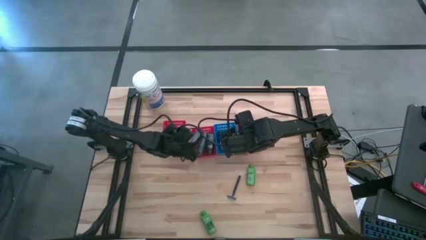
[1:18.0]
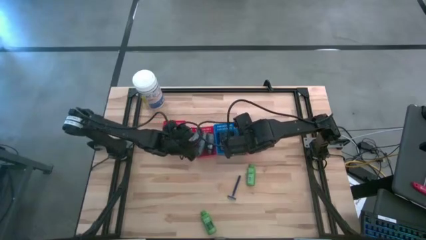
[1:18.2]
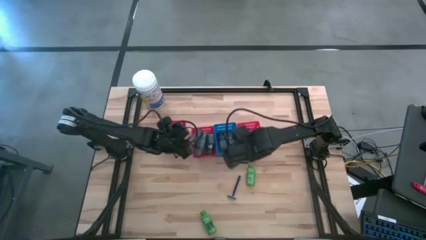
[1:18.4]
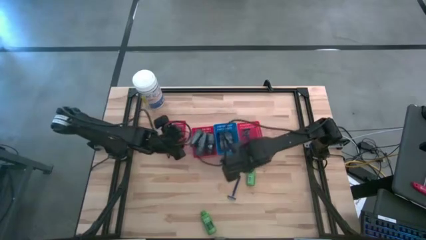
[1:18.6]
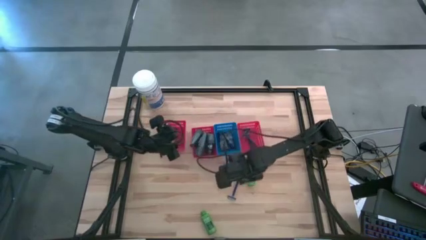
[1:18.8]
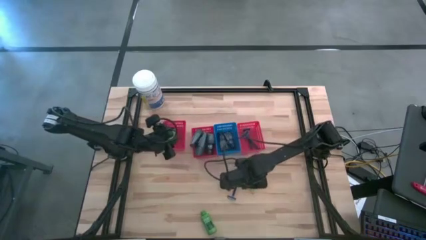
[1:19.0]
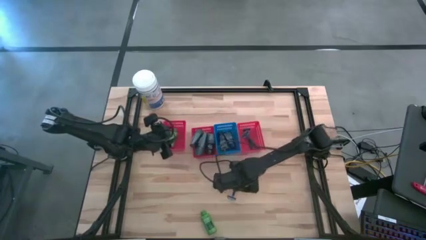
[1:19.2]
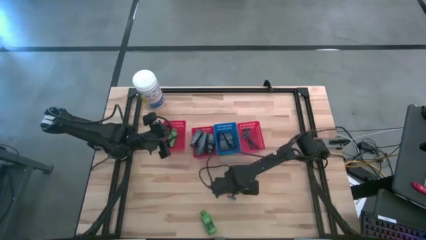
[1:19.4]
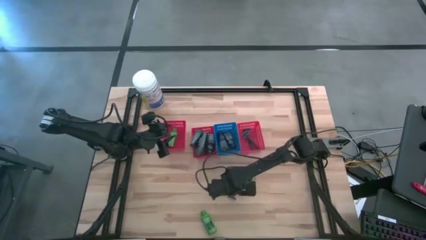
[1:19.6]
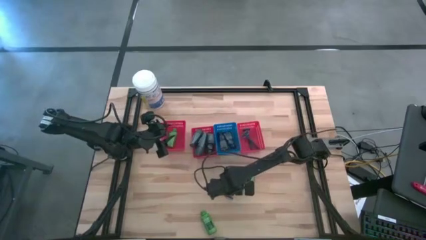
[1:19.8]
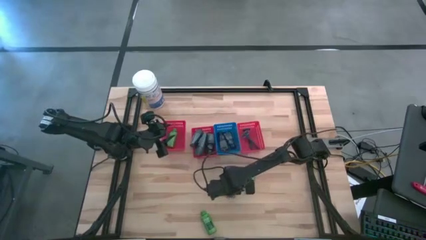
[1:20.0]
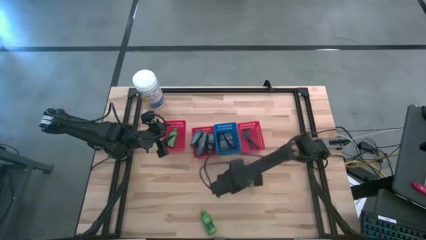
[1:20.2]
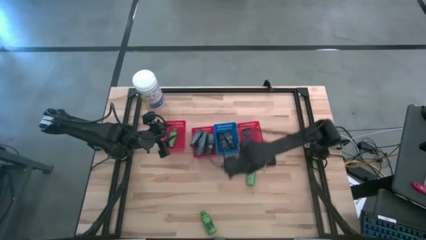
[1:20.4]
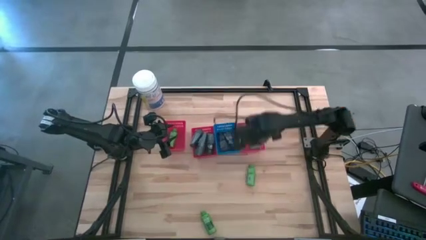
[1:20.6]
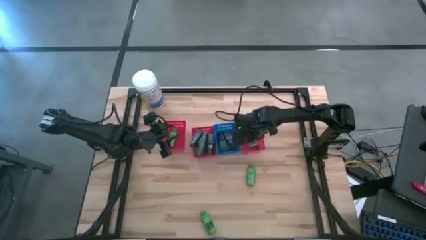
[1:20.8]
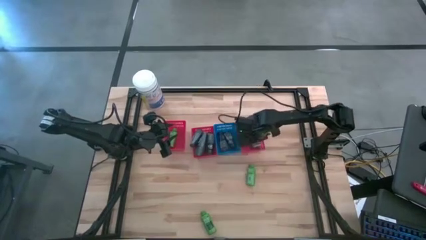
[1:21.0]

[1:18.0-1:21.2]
Task: Pick & Place Travel size toiletries
Put the blue razor into the right red bin

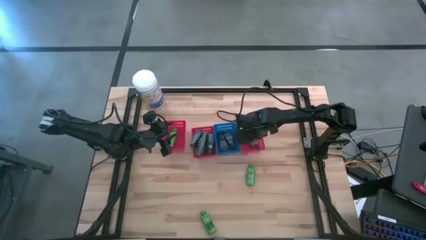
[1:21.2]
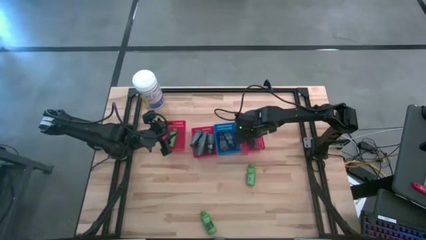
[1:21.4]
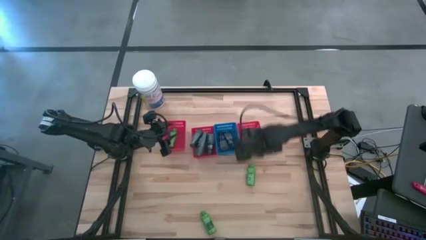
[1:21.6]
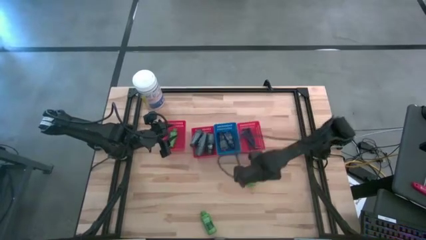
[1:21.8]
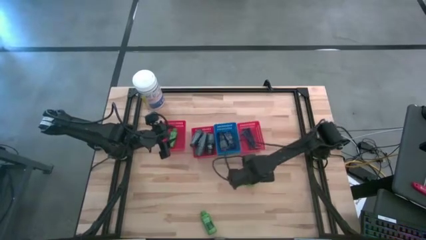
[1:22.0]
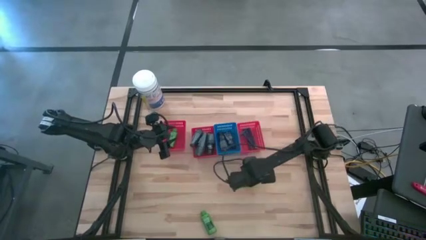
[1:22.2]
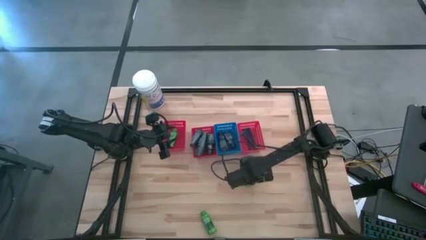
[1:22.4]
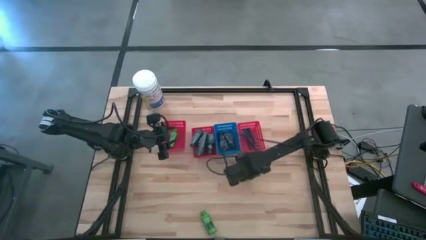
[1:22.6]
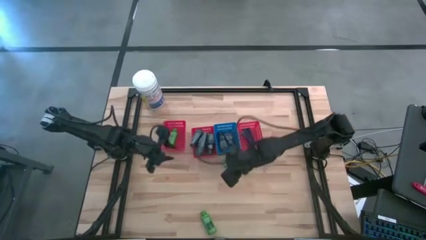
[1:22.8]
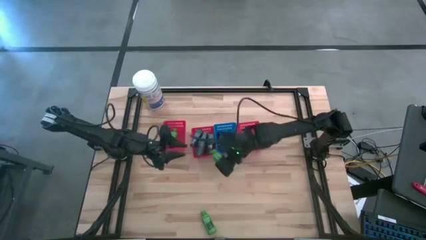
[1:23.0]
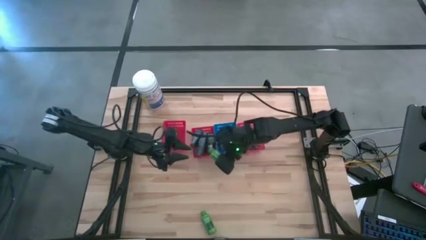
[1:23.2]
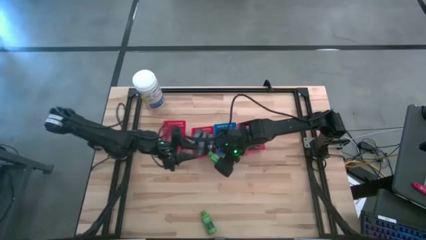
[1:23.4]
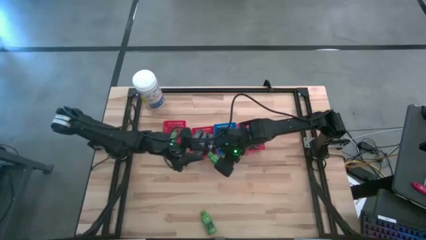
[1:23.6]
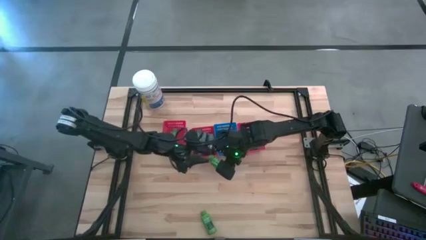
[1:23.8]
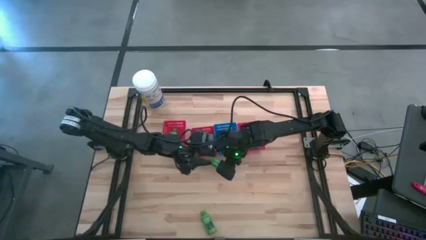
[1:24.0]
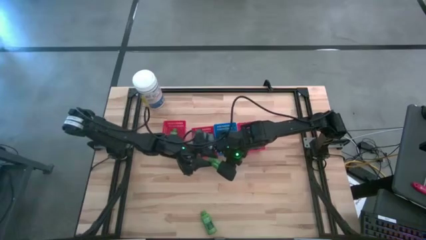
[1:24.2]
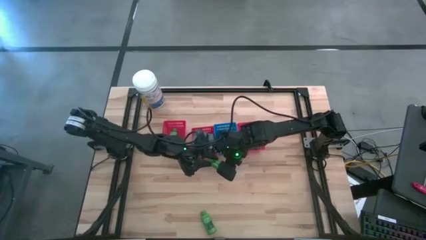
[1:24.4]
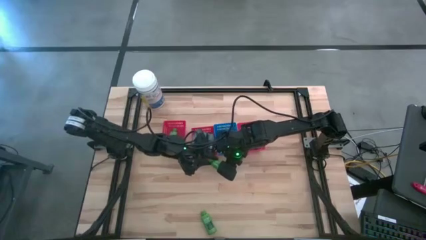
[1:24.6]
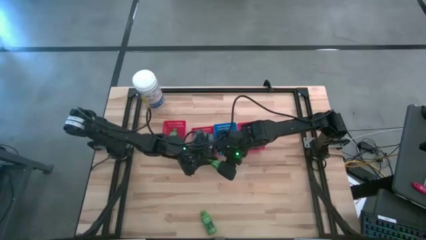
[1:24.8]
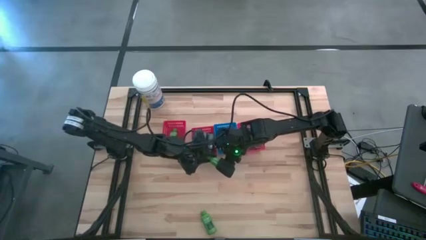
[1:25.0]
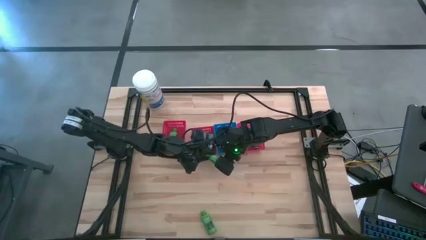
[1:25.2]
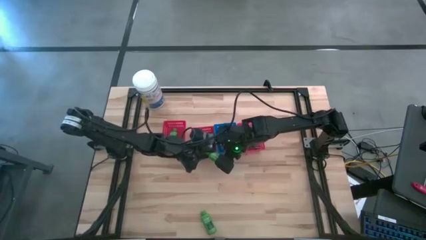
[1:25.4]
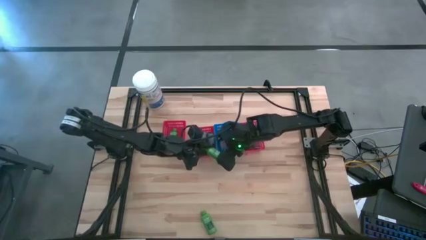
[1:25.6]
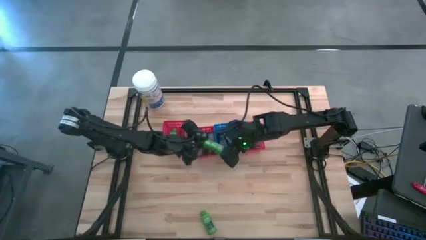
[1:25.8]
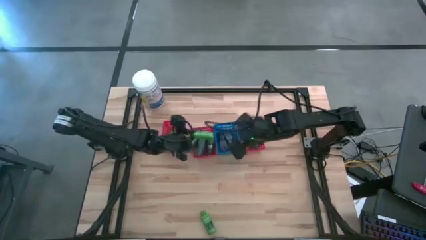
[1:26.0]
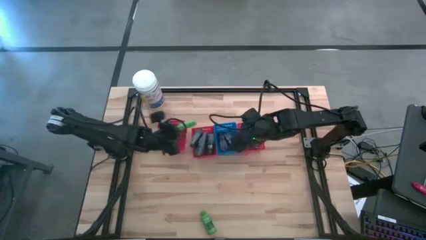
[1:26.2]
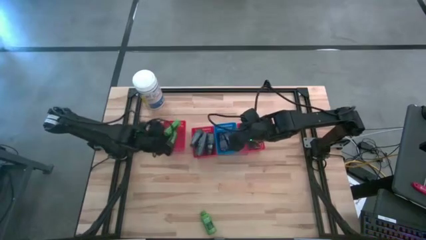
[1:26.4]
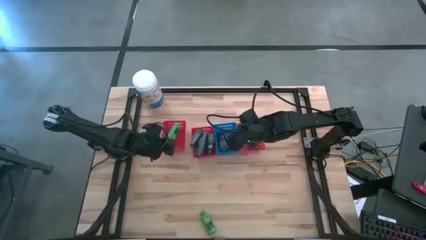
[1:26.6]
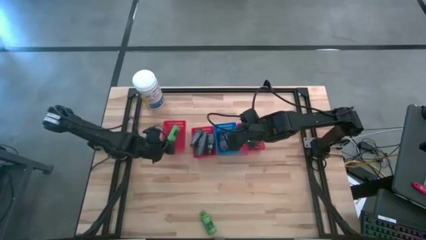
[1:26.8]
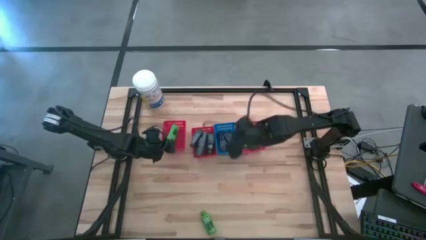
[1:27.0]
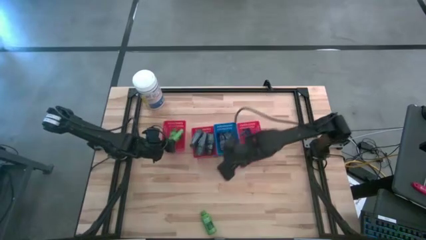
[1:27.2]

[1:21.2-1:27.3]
Put the green shampoo into the left red bin

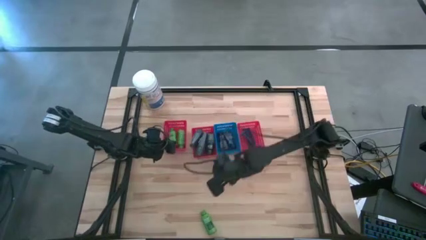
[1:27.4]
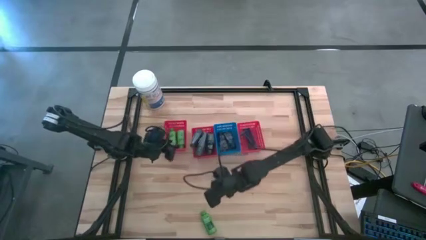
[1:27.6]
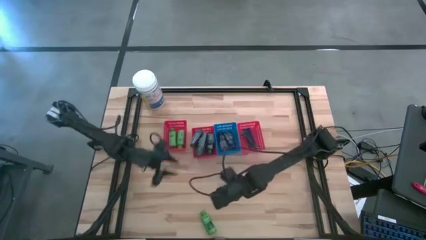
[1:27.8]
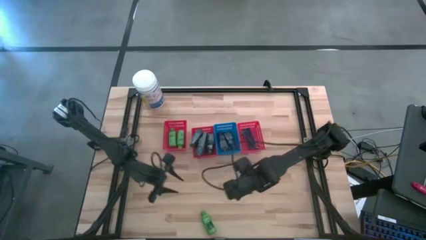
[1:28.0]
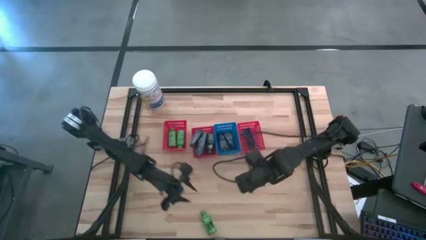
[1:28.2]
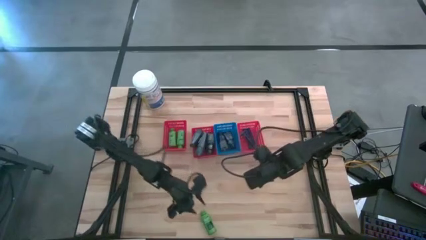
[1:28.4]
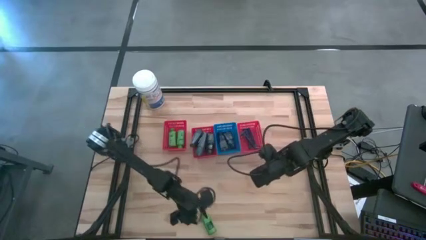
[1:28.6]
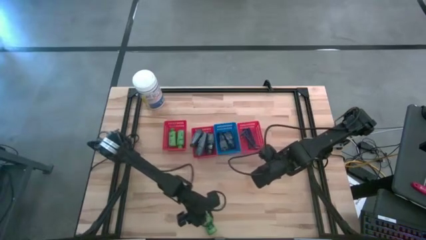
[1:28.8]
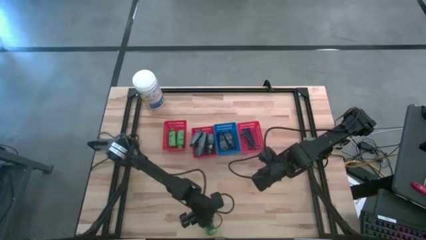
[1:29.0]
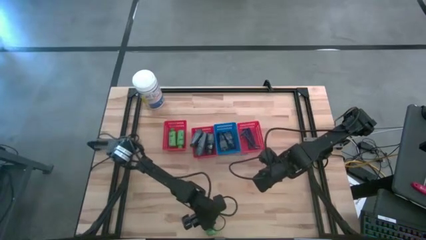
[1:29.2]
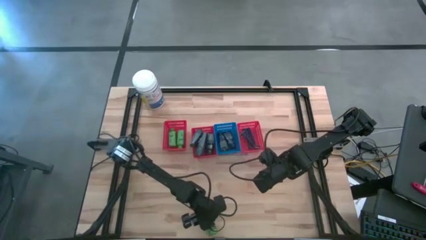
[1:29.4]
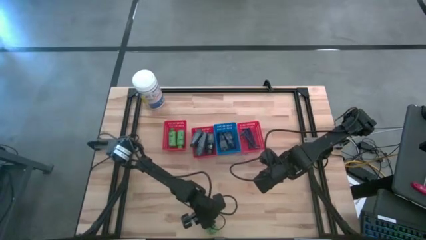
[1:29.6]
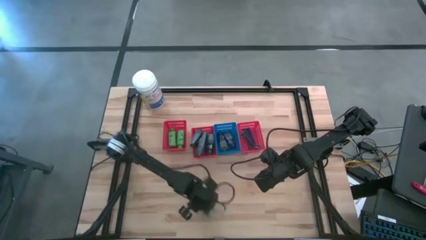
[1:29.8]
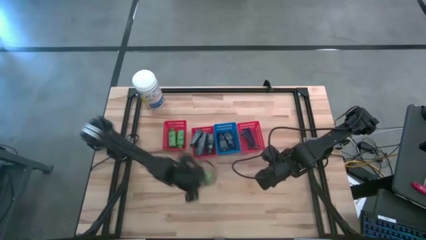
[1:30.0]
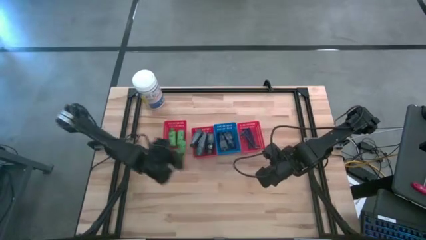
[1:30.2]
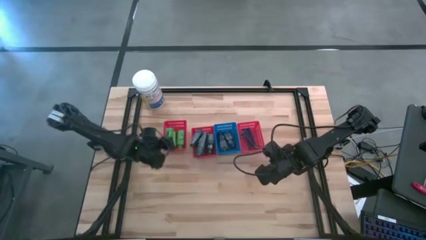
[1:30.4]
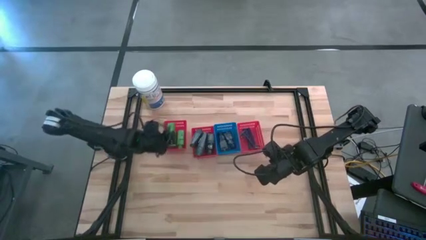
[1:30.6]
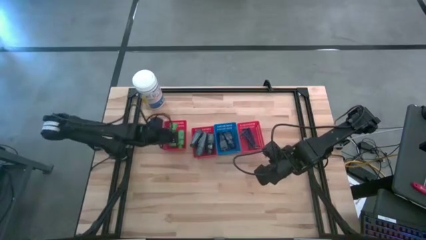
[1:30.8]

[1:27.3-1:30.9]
Put the green shampoo into the left red bin

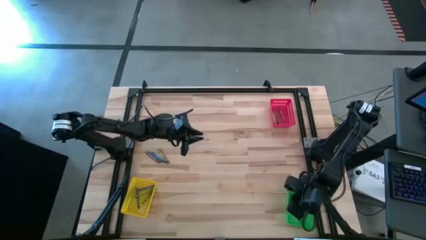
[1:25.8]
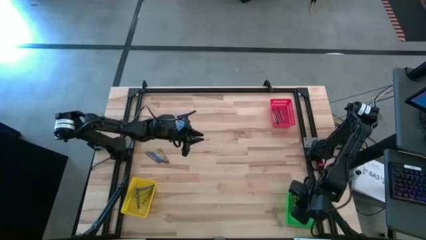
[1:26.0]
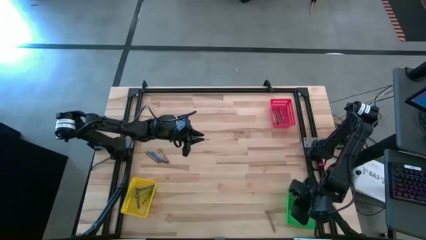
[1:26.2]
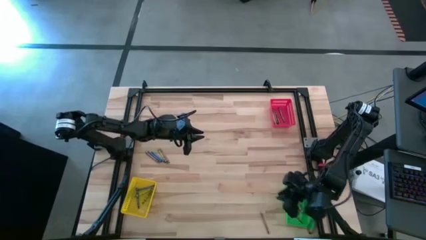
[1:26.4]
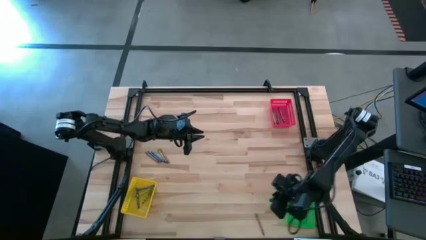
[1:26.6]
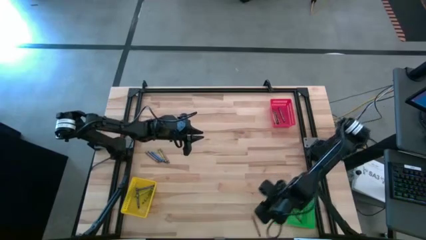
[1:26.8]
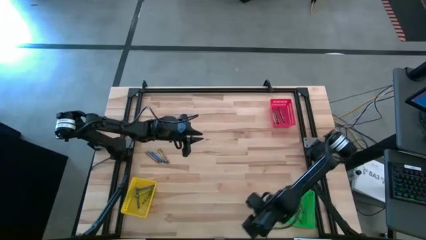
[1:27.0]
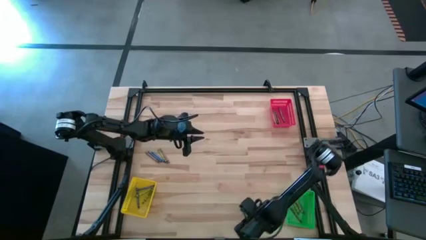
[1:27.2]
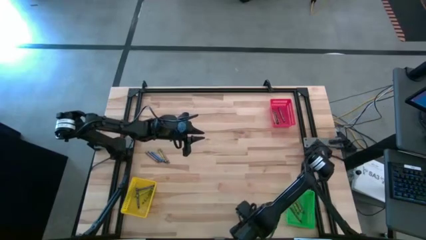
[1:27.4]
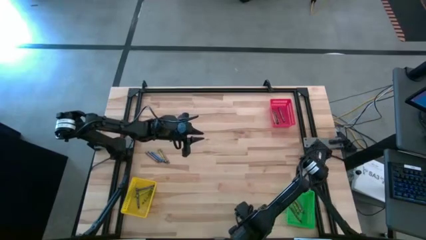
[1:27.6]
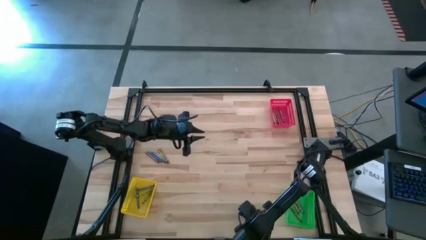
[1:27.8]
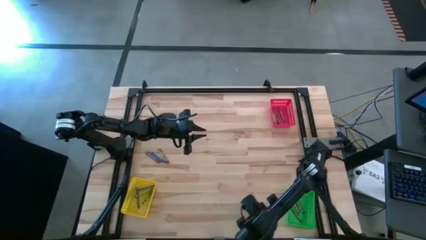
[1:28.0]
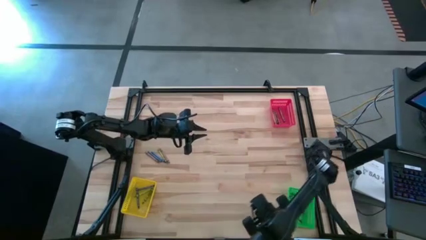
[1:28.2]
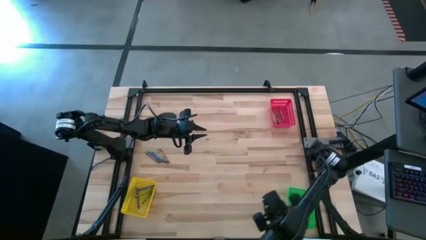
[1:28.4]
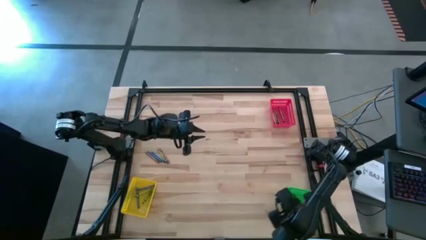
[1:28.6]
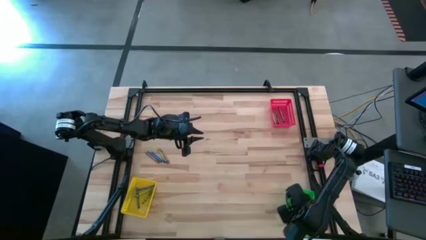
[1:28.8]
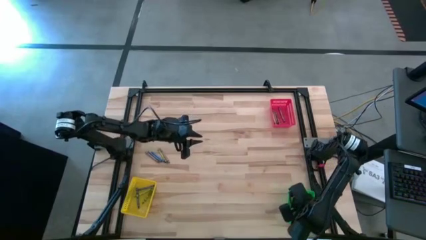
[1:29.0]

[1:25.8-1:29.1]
Task: Sort crayons
Put the brown crayon into the green bin
